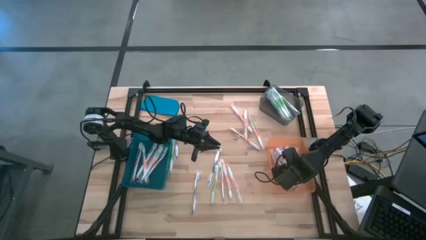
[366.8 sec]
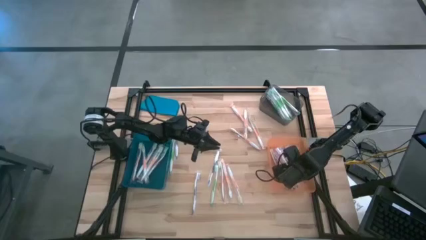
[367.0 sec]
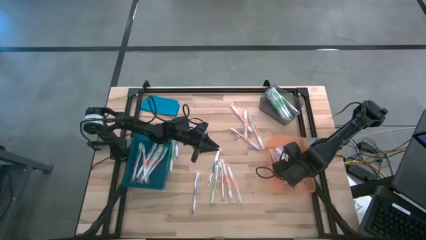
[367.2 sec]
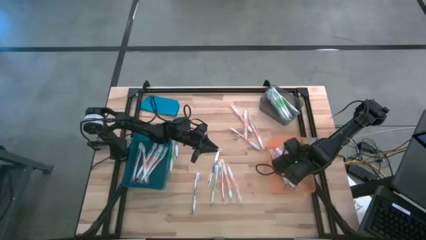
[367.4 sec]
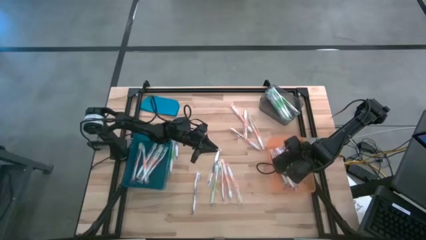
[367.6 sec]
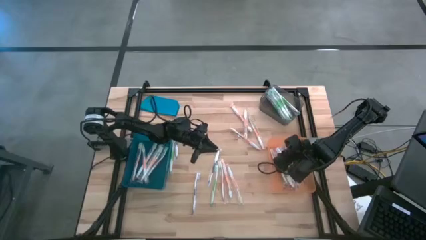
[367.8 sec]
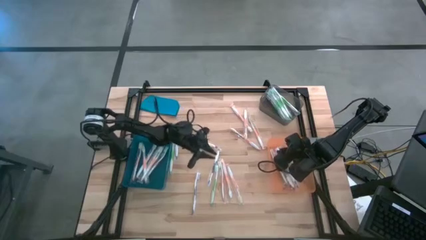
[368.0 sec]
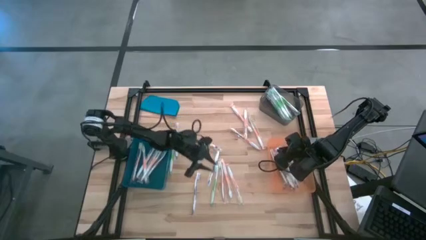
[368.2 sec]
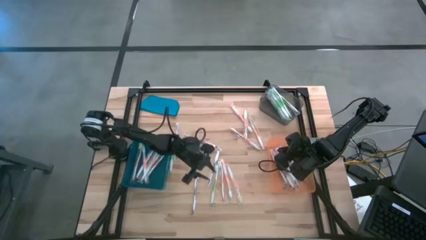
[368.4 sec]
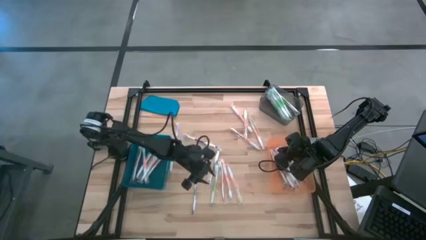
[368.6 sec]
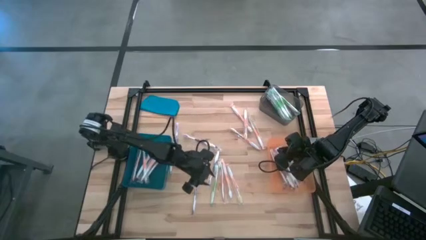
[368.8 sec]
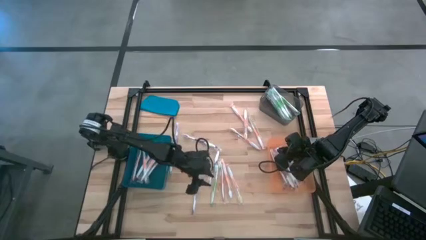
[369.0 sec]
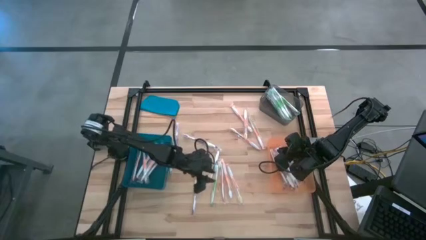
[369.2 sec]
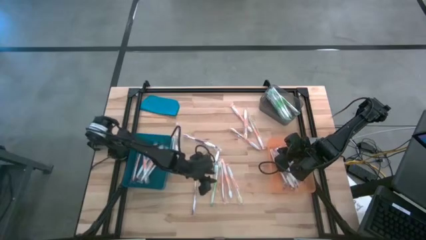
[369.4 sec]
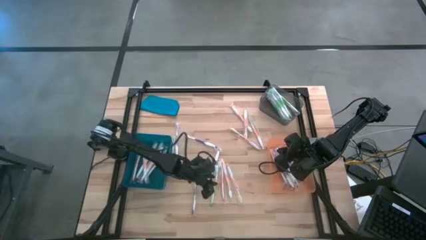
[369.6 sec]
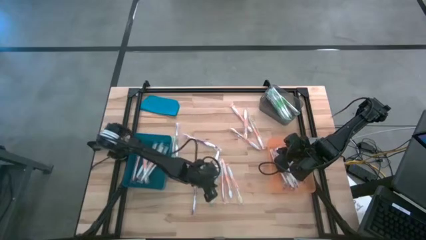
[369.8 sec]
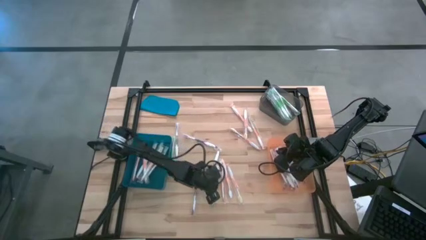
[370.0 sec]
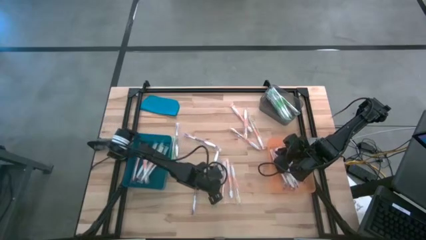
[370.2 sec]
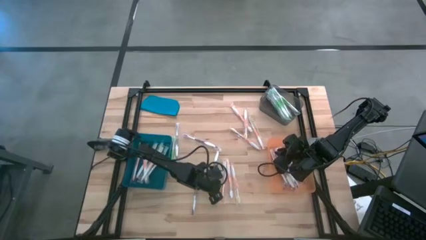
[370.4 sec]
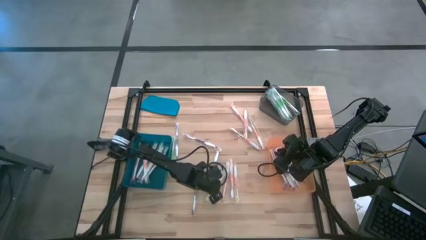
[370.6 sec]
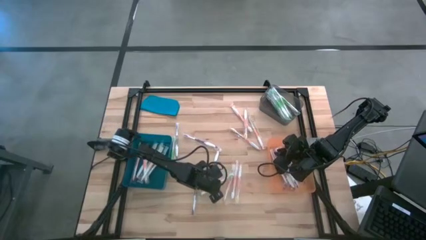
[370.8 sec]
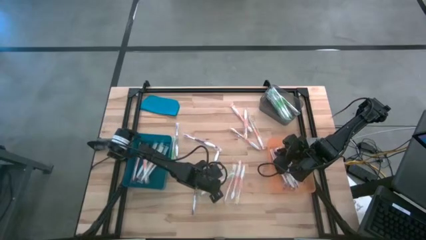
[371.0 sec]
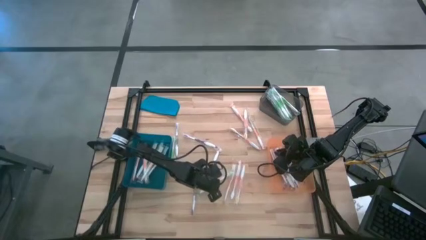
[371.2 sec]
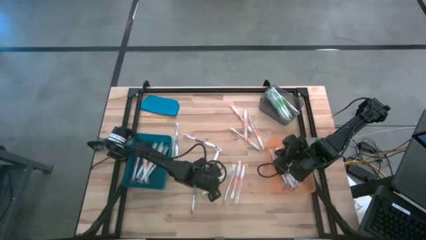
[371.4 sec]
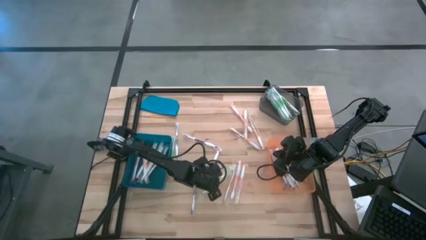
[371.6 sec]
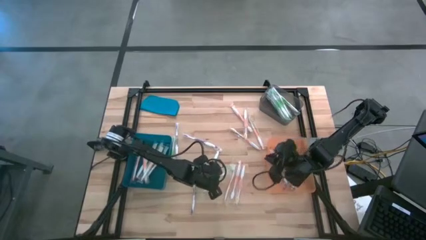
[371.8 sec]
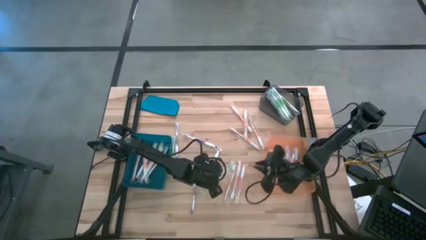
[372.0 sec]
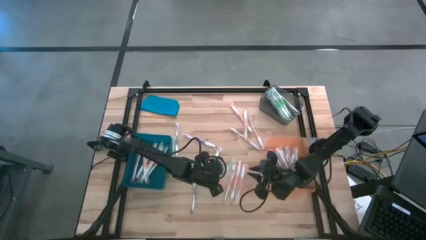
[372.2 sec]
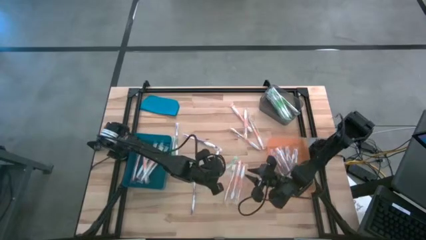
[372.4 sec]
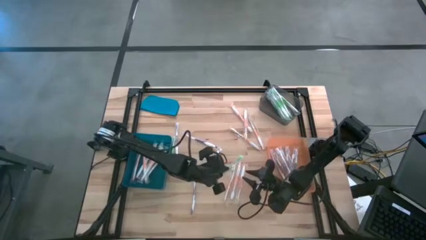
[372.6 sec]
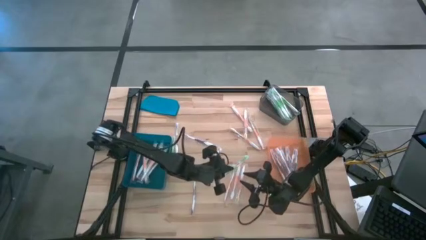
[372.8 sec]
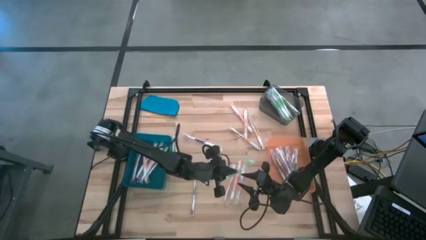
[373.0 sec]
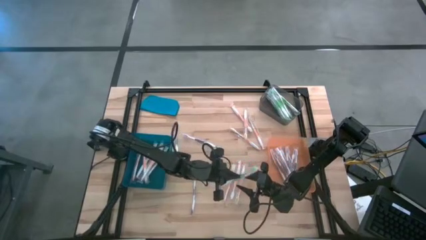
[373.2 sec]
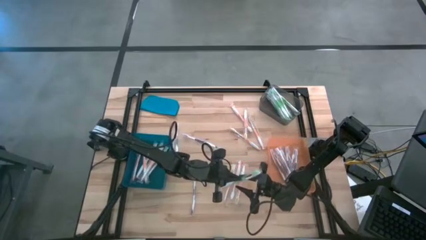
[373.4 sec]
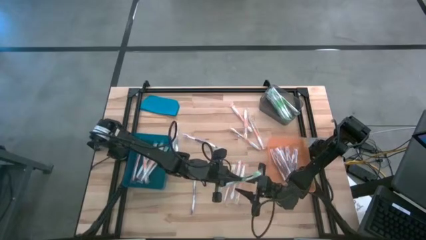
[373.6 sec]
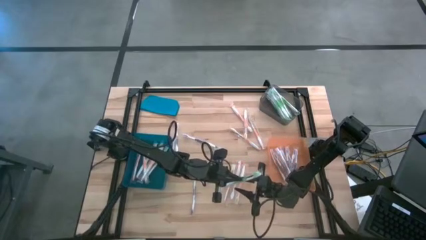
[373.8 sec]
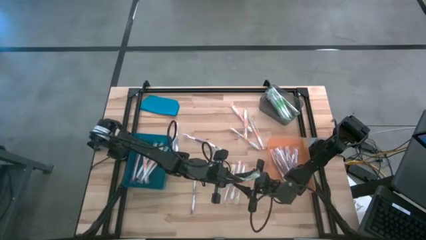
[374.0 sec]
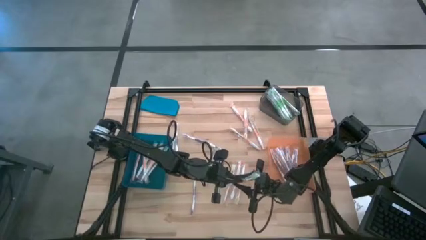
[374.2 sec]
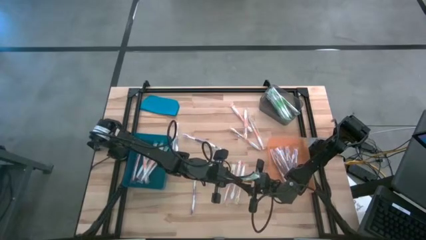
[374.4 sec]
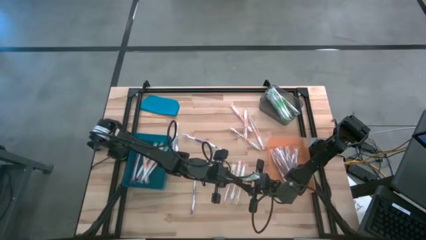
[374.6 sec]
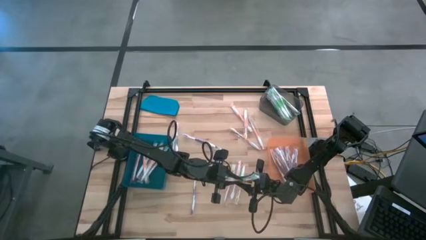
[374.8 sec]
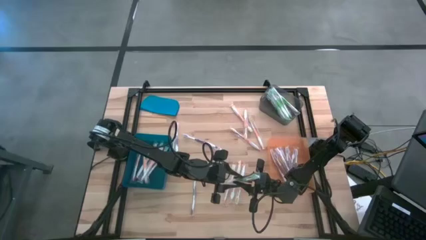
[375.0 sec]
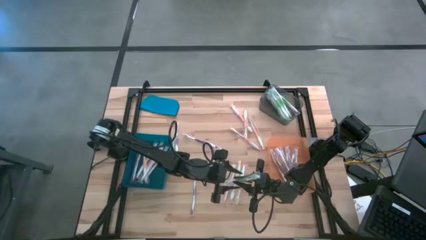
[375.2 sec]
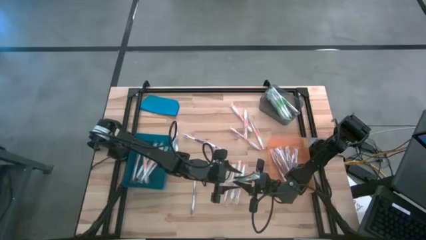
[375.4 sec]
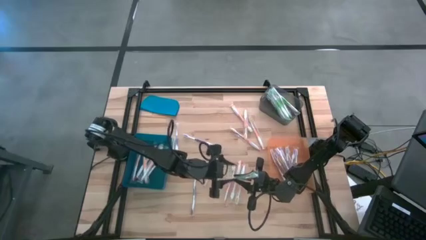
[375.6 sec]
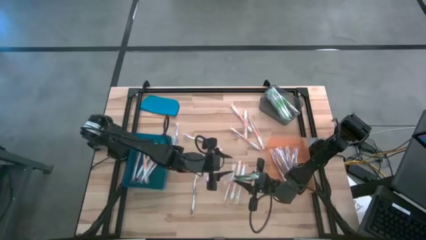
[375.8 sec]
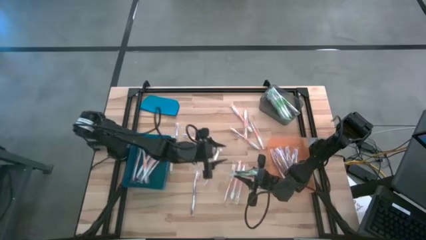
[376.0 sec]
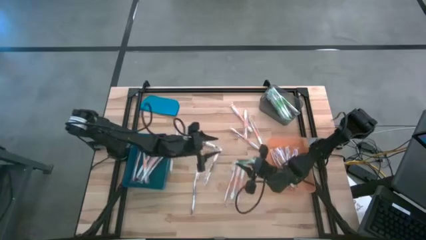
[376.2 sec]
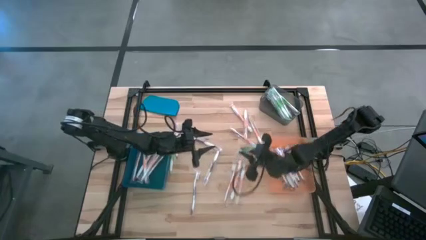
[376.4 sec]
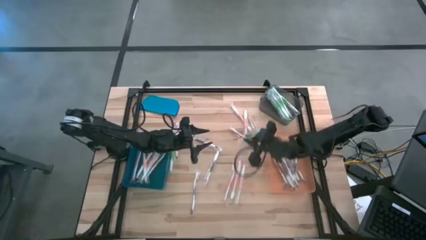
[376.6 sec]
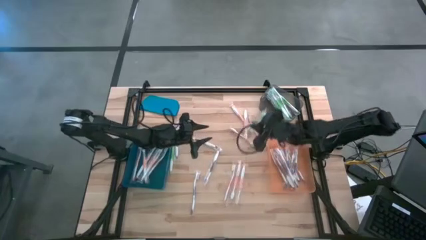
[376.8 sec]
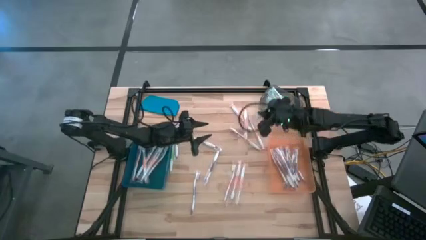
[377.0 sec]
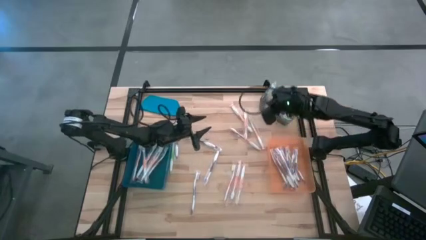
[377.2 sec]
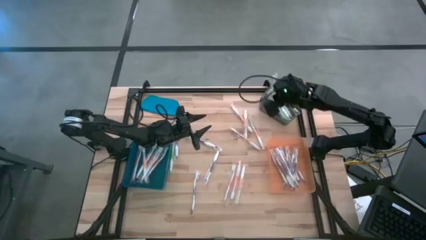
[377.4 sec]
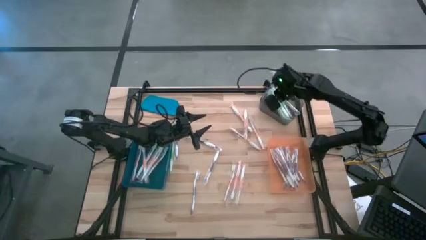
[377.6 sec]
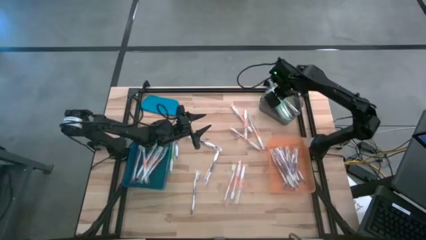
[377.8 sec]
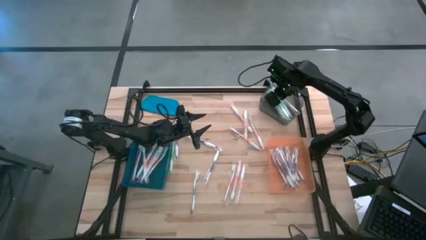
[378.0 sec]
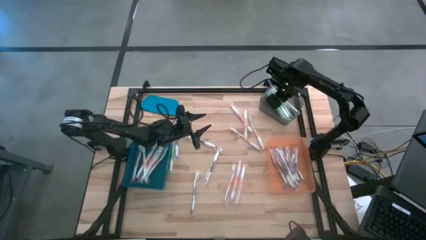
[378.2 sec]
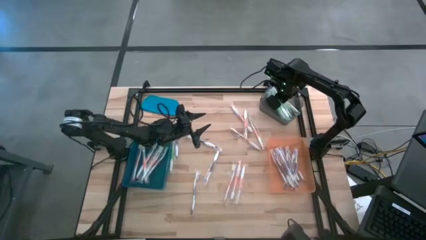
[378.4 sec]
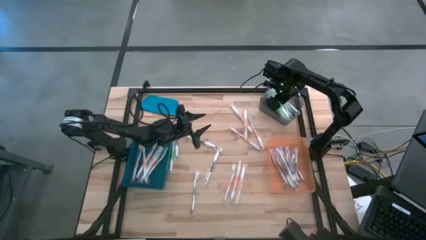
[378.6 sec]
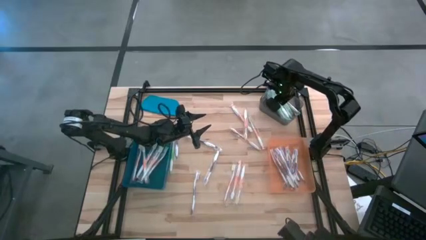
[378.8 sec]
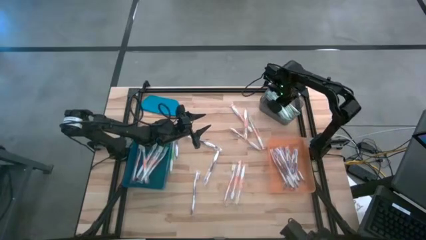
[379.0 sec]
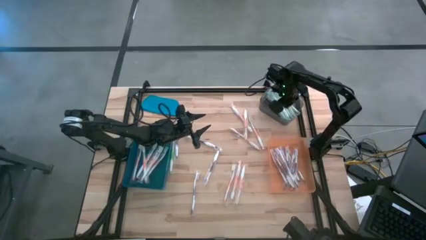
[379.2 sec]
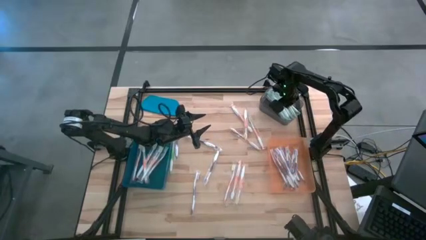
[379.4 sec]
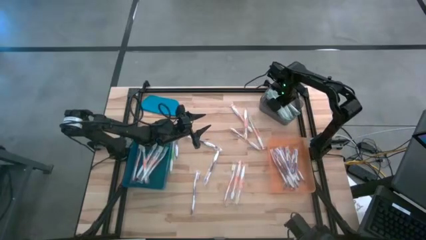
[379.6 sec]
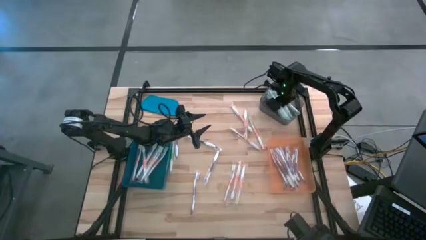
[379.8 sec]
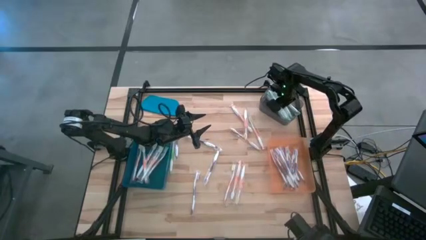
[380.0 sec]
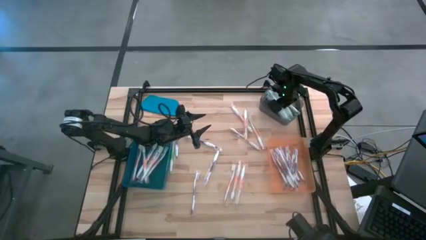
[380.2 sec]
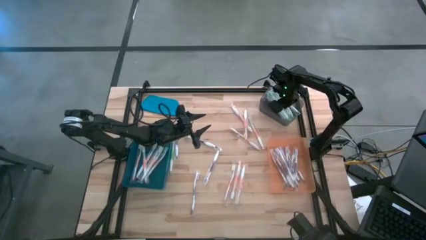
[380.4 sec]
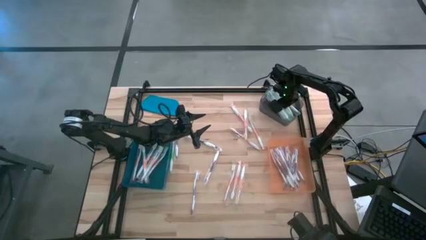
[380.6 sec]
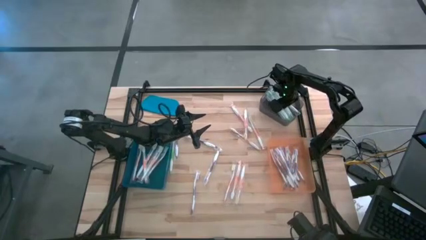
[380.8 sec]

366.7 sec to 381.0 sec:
Task: Pick & Place Toothbrushes
Put the green toothbrush into the black bin
